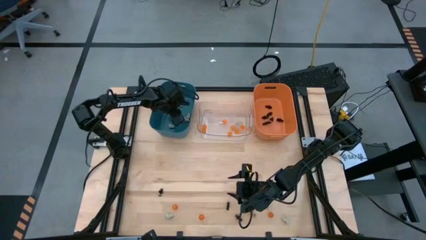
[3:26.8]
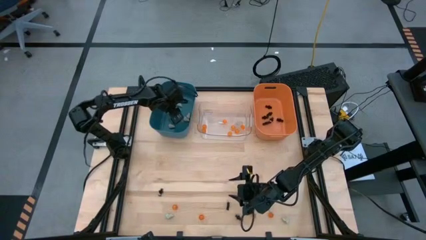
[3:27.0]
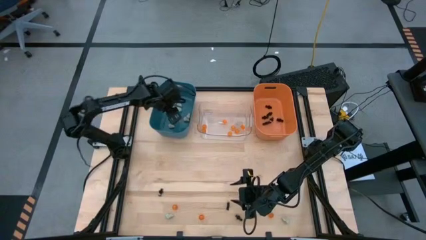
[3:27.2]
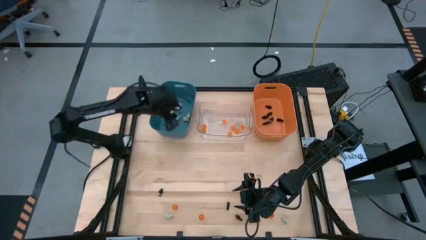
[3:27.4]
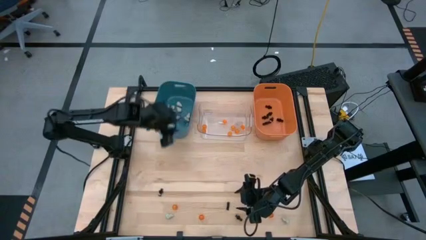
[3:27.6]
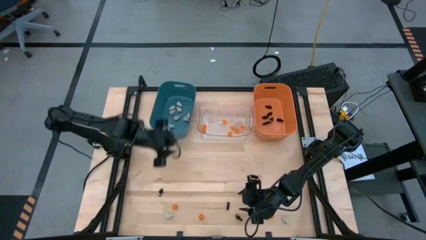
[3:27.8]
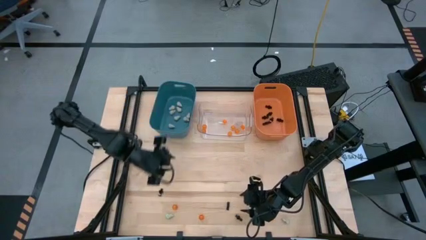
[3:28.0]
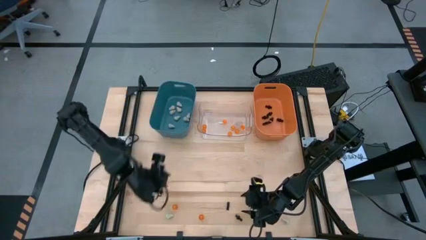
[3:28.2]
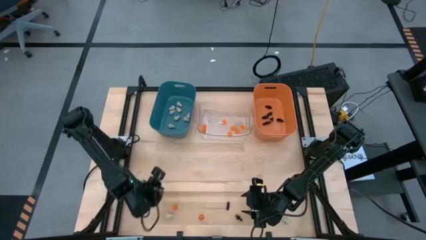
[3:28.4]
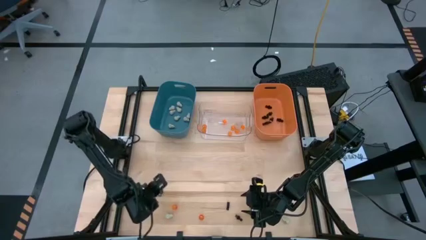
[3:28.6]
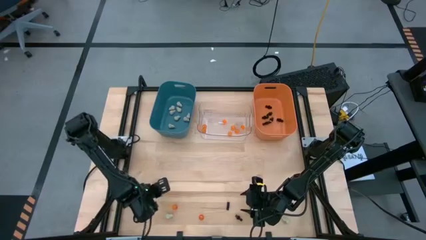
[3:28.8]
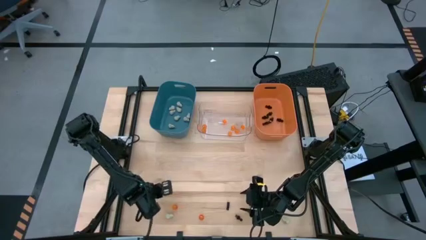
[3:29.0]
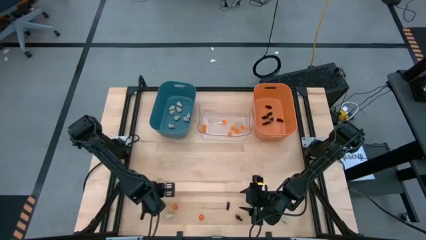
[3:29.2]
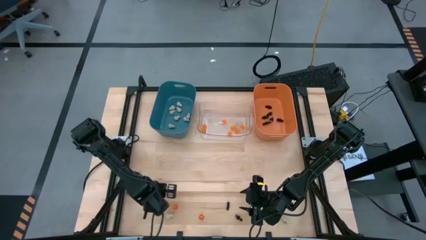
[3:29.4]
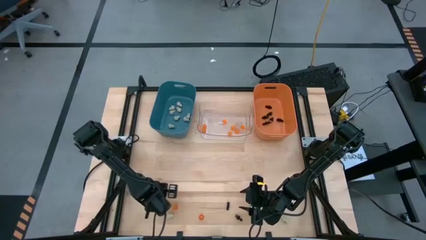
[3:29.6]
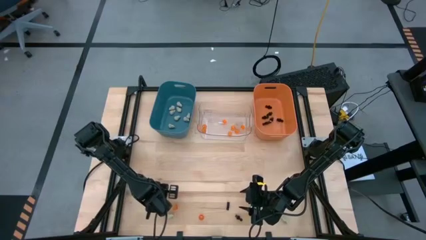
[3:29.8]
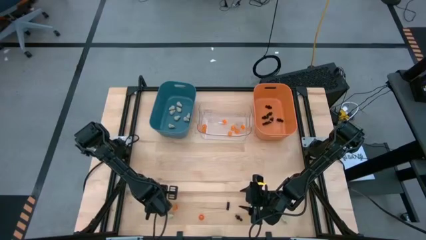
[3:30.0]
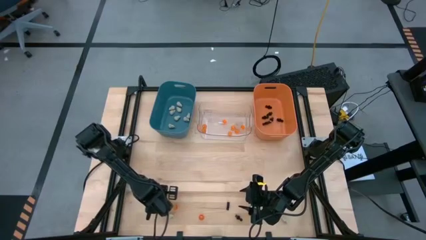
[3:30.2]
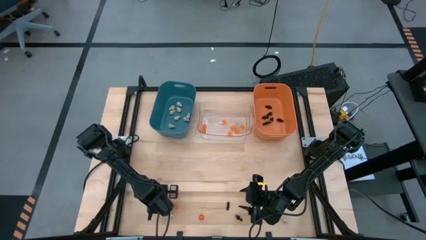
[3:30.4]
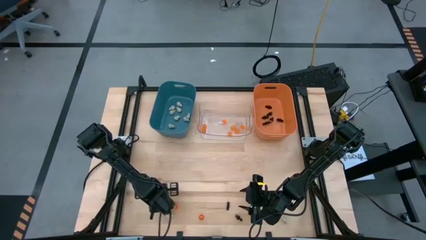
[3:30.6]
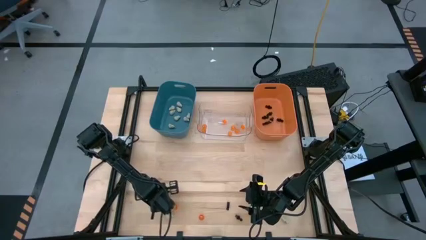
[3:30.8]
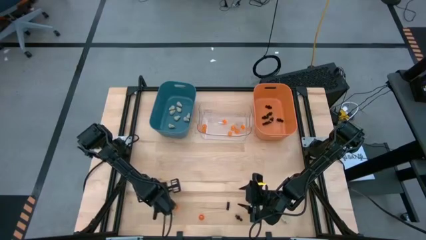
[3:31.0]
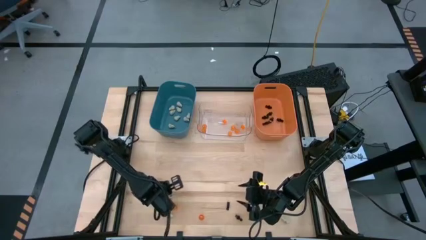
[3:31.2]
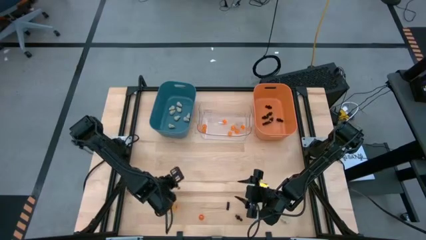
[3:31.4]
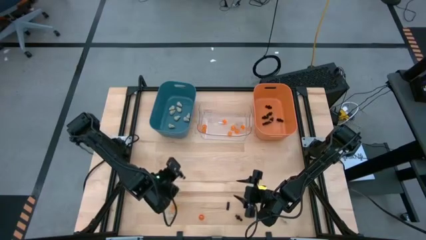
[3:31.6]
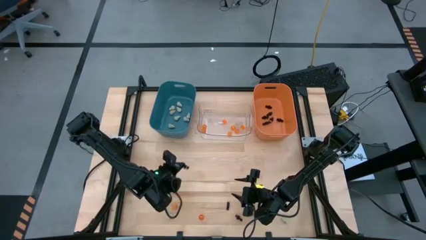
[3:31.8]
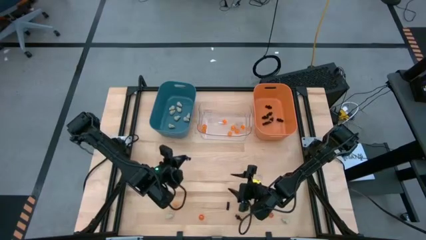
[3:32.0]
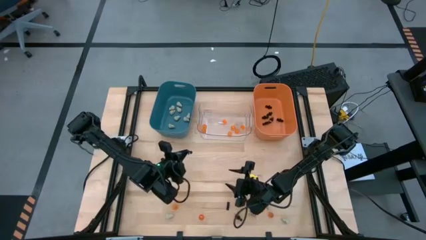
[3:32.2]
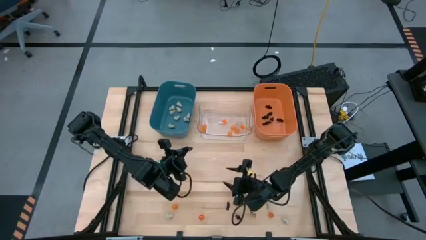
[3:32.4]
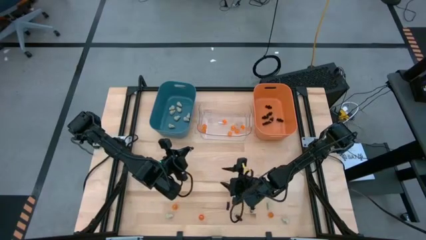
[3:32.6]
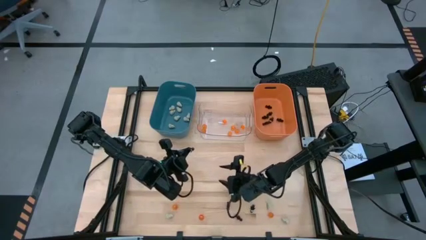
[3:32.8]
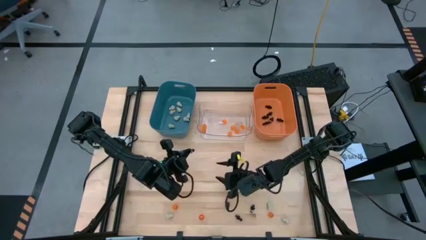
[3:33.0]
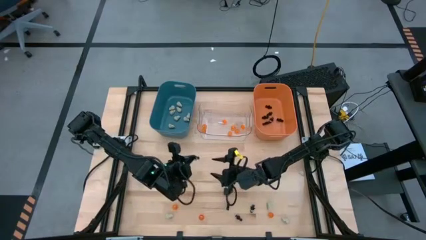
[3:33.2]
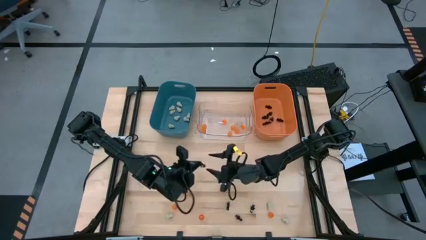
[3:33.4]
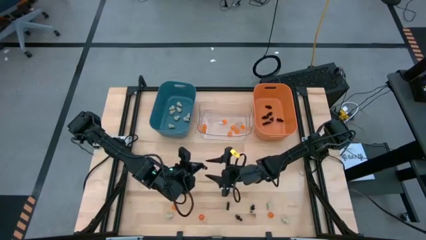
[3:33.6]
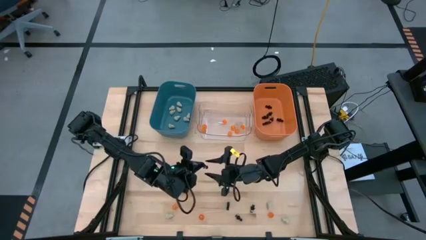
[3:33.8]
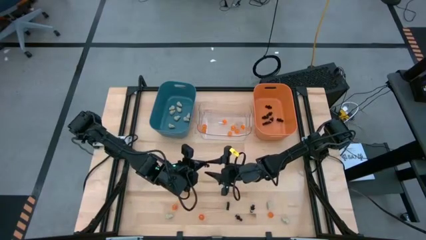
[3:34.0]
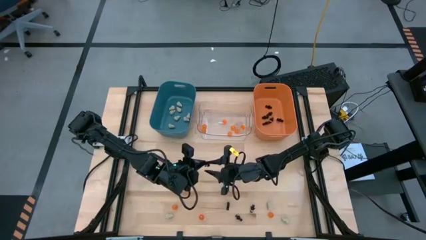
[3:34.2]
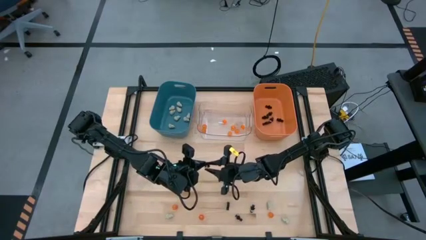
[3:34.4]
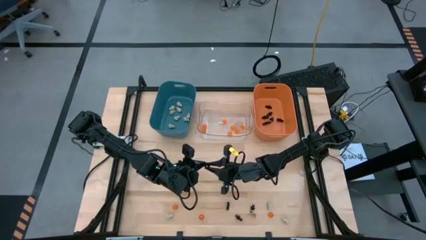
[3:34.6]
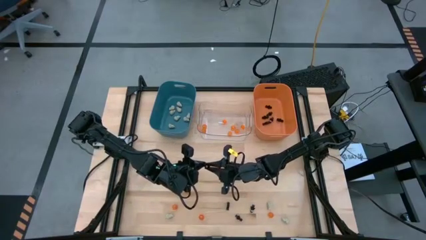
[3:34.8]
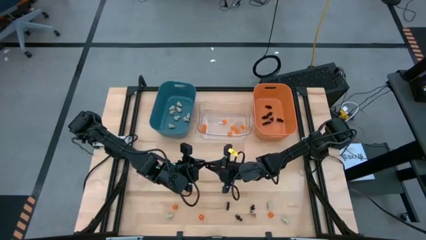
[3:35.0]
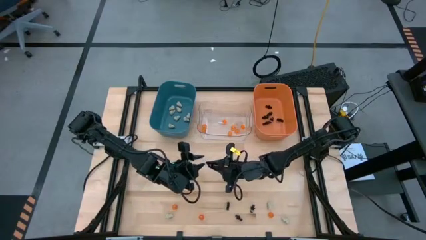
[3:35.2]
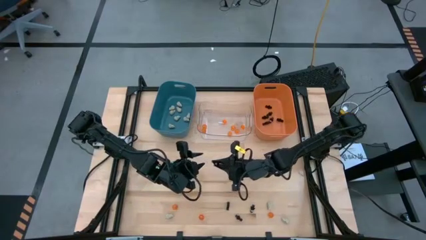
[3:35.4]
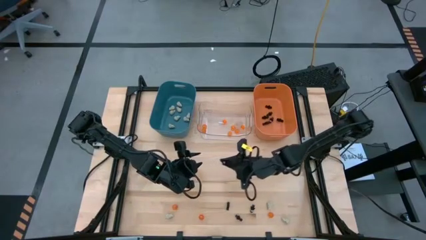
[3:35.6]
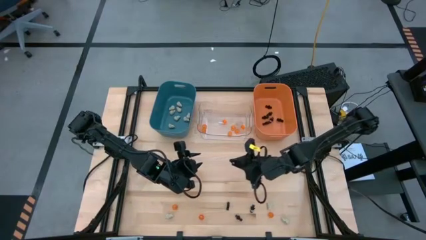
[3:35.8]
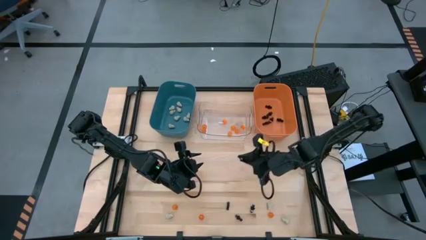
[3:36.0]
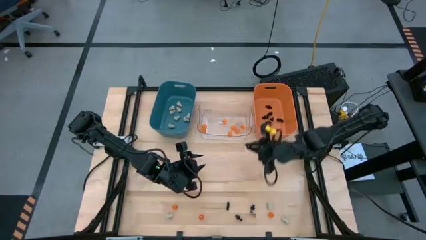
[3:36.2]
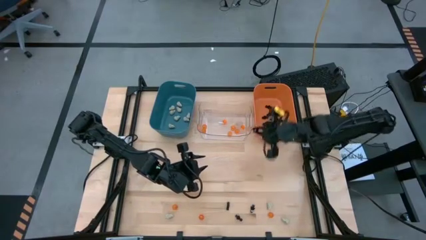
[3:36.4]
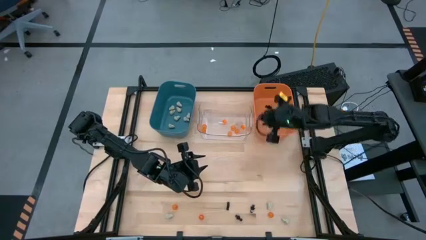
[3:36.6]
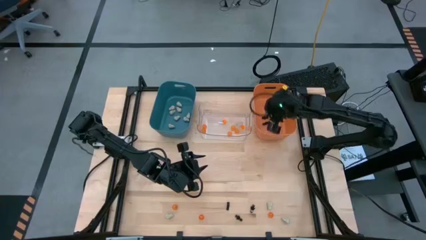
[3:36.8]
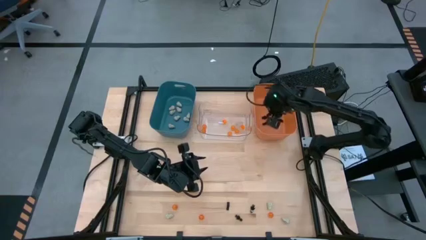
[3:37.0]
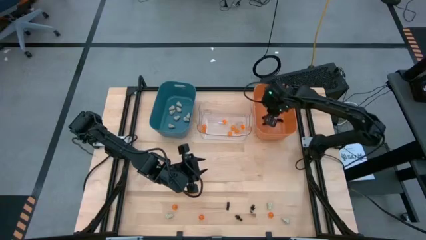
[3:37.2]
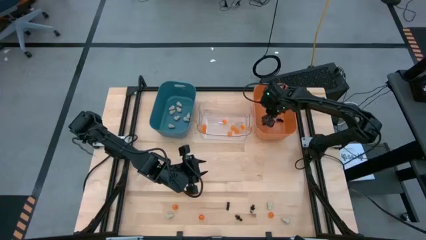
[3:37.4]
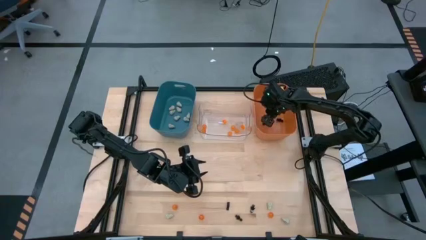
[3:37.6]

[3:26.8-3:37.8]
Task: Sort Halloween decoration
Put the black skeleton toy into the orange bin

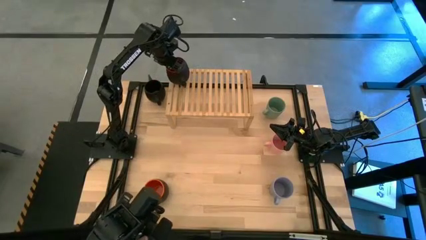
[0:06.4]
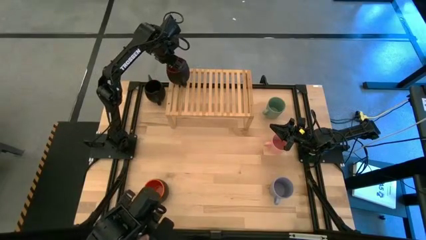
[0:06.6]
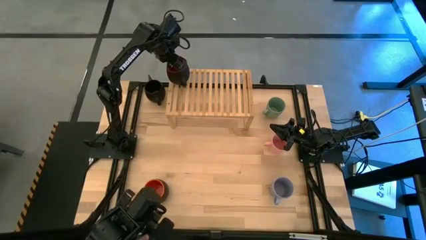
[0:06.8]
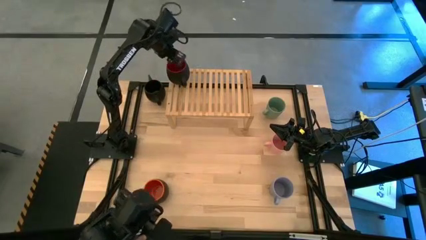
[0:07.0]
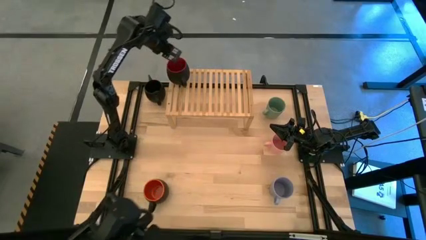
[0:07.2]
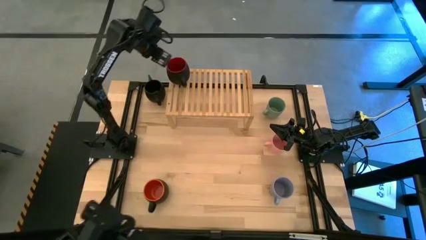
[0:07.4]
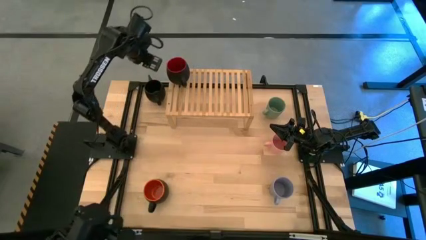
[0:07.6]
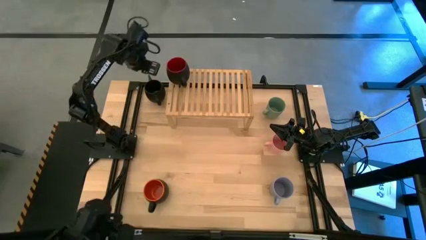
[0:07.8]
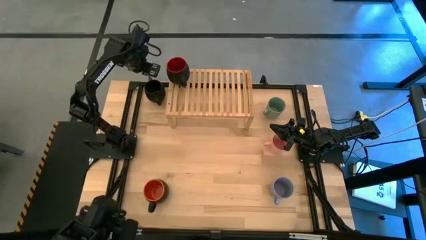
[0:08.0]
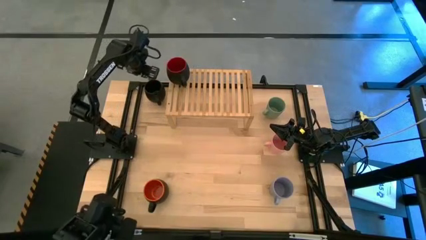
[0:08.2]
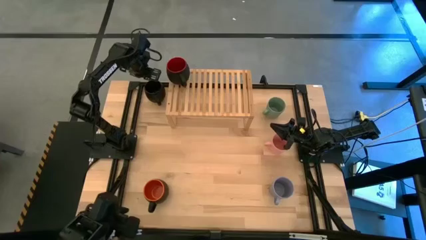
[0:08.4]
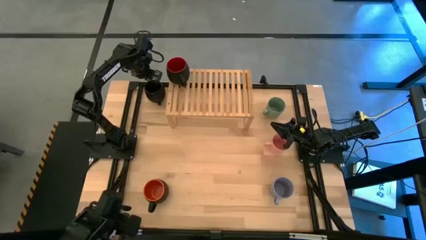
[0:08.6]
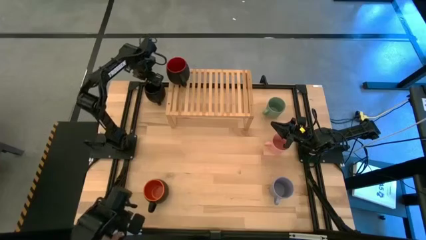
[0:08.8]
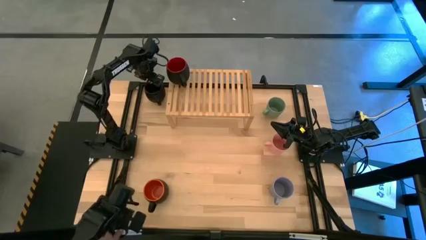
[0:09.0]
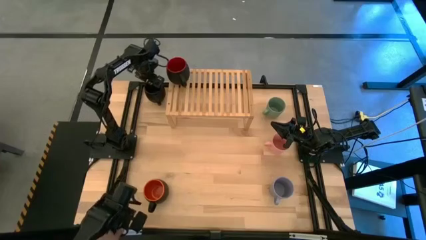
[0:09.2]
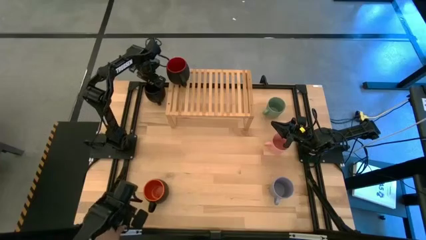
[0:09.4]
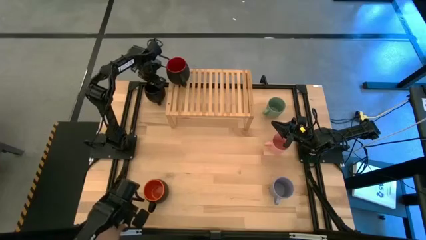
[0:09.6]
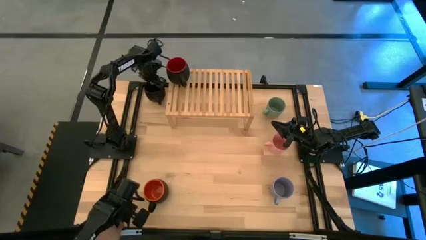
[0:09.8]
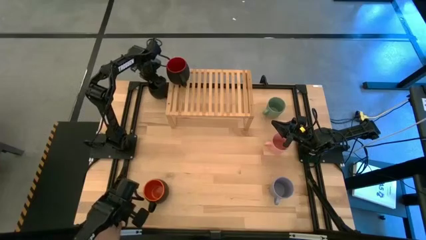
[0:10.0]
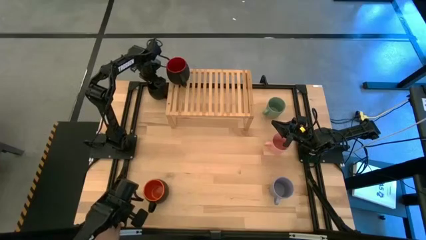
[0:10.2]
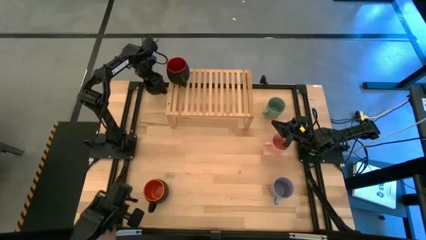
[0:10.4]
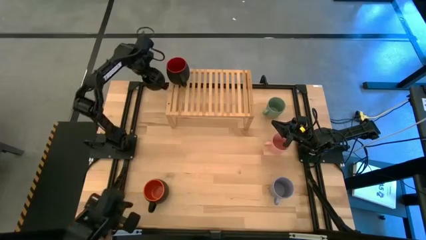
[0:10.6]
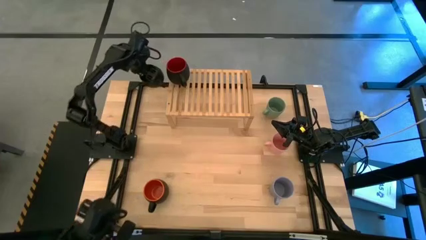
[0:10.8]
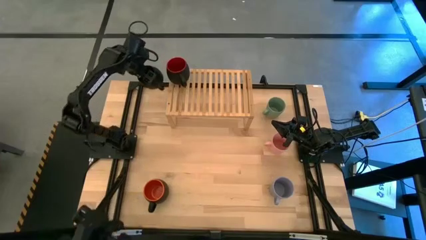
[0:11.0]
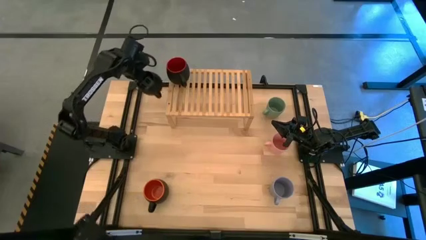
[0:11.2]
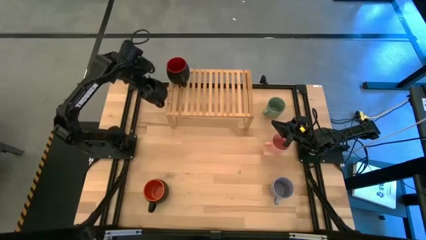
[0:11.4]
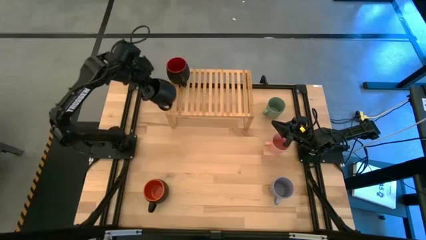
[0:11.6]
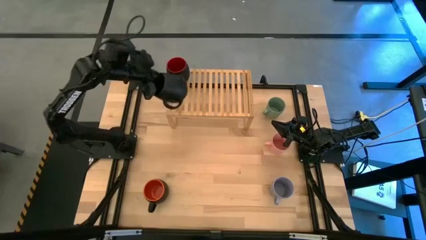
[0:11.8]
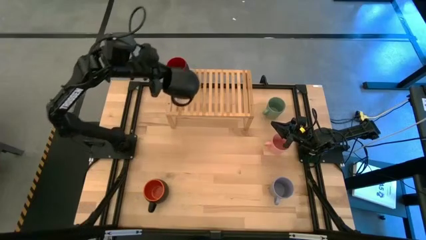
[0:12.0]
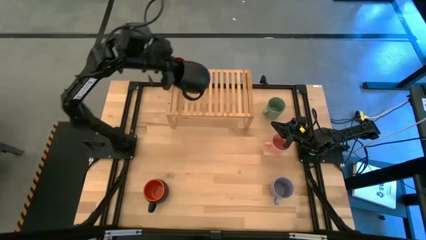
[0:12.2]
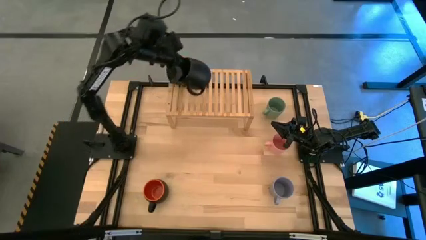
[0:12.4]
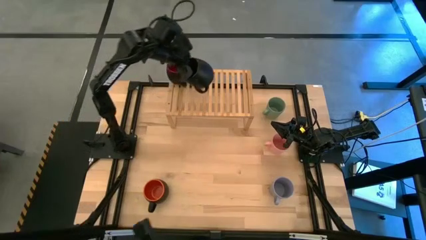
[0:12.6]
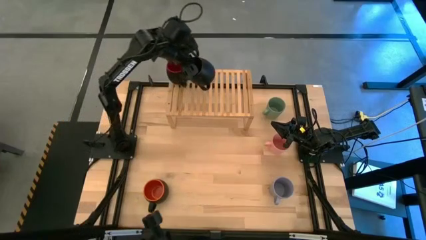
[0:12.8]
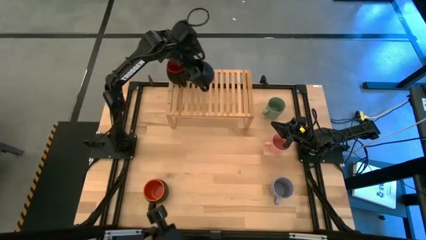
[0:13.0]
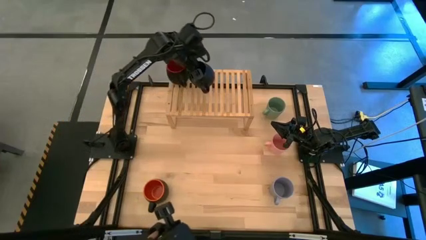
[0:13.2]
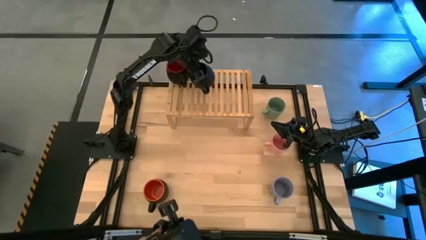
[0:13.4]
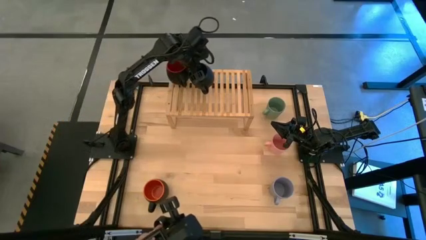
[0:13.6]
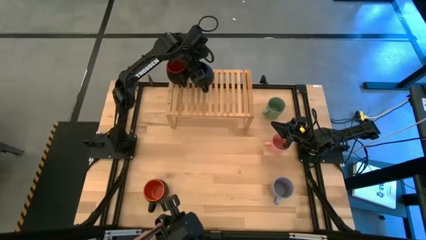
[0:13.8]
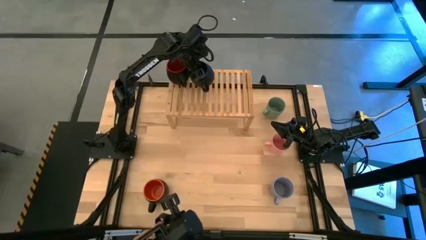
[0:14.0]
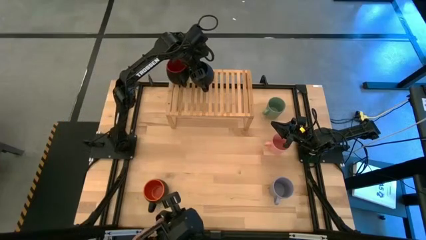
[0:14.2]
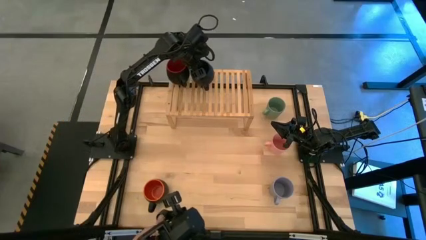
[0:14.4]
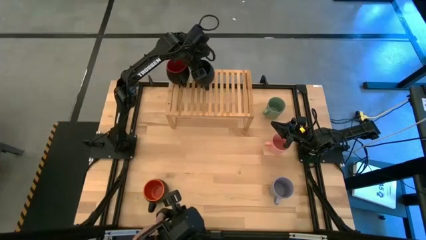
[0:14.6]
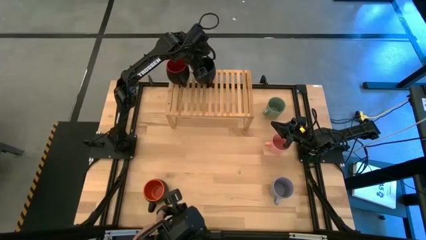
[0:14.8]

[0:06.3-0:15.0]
Task: Place coffee mugs
Put the black mug on the shelf
